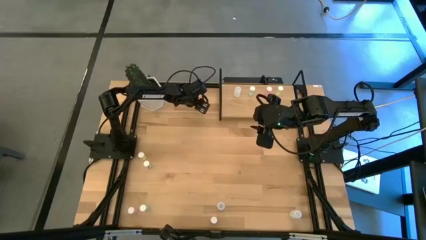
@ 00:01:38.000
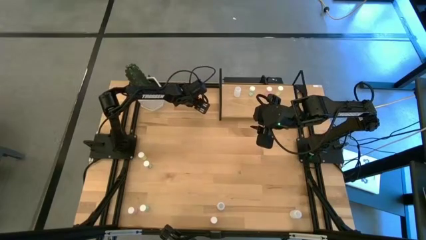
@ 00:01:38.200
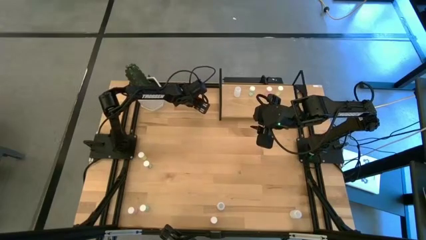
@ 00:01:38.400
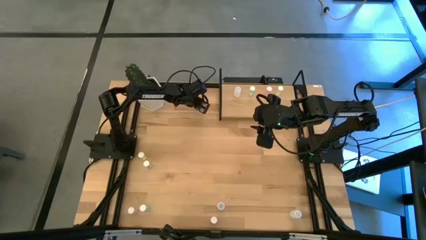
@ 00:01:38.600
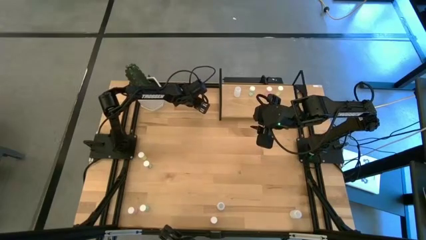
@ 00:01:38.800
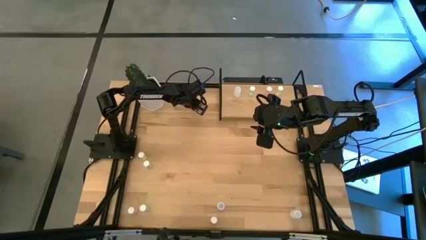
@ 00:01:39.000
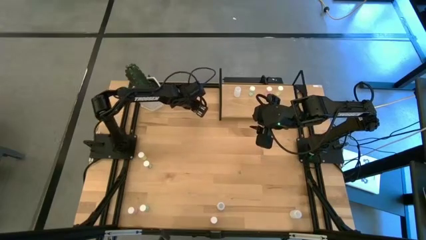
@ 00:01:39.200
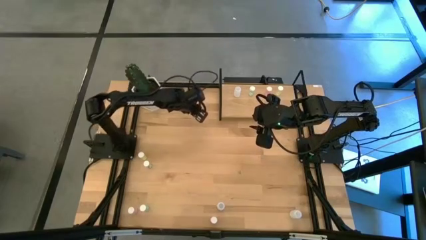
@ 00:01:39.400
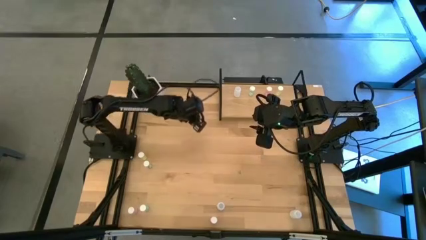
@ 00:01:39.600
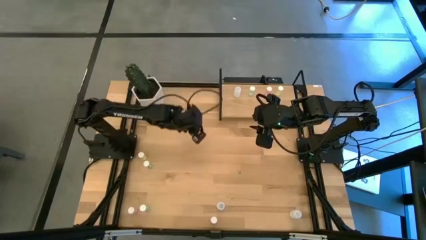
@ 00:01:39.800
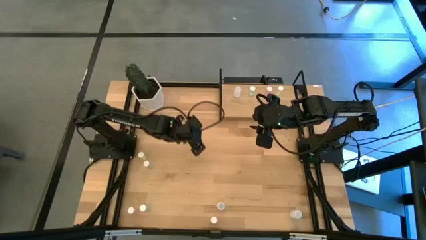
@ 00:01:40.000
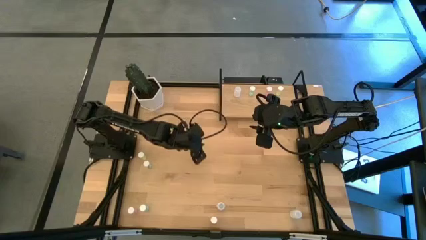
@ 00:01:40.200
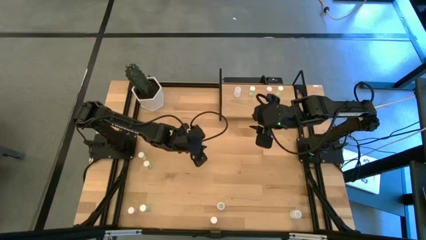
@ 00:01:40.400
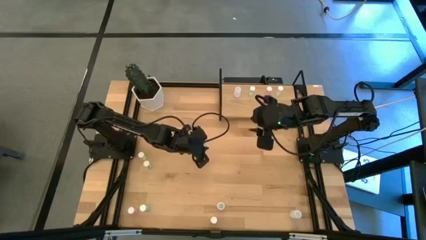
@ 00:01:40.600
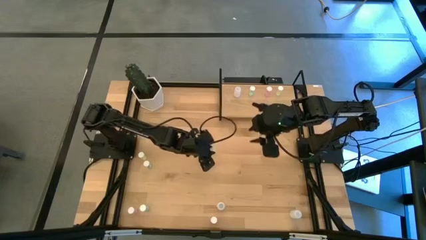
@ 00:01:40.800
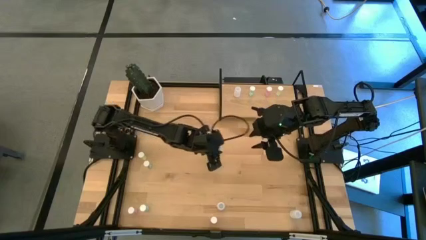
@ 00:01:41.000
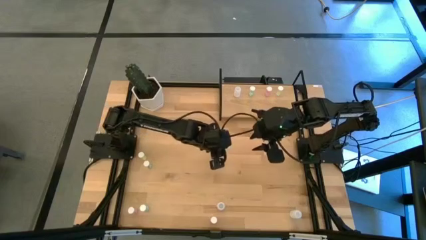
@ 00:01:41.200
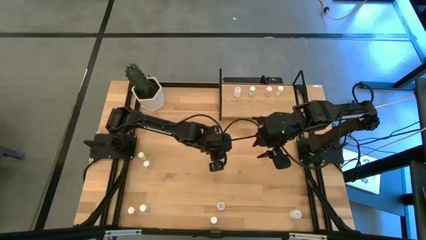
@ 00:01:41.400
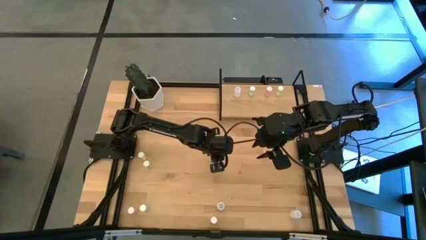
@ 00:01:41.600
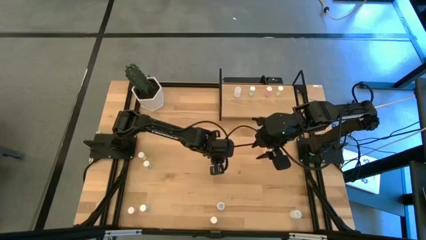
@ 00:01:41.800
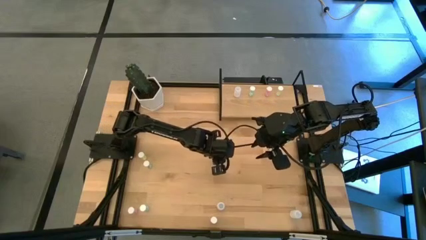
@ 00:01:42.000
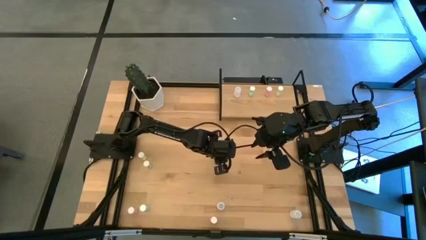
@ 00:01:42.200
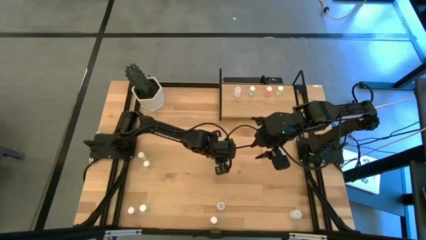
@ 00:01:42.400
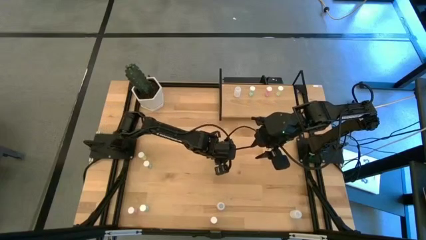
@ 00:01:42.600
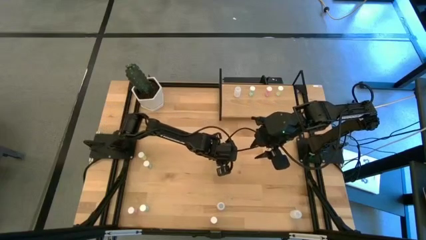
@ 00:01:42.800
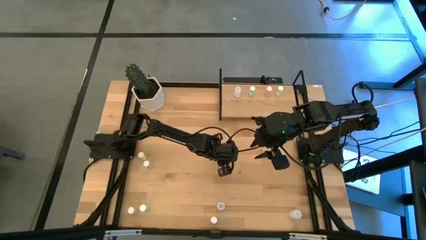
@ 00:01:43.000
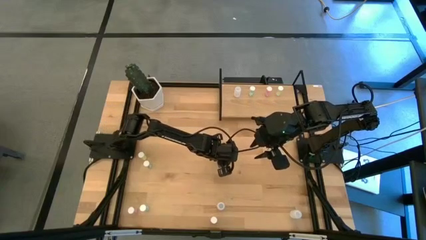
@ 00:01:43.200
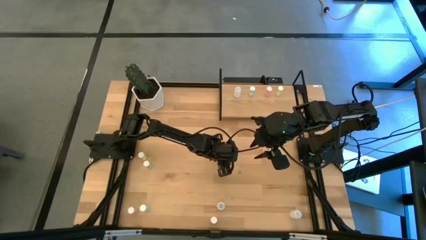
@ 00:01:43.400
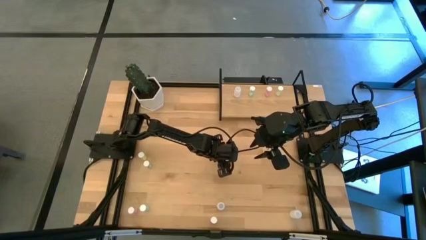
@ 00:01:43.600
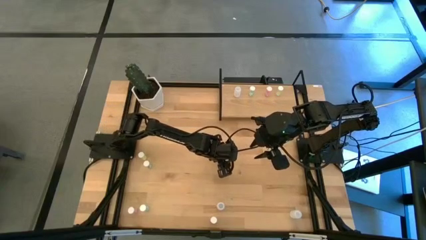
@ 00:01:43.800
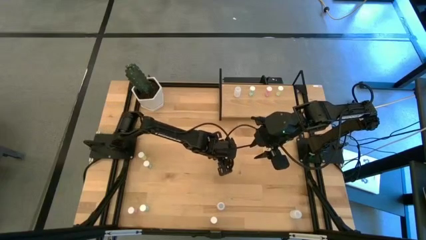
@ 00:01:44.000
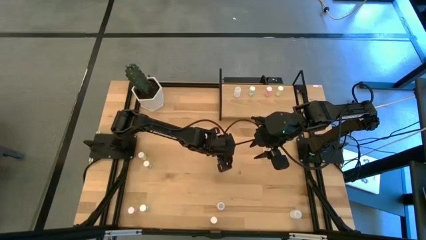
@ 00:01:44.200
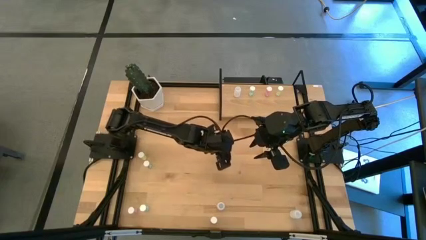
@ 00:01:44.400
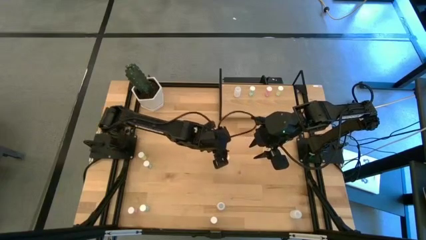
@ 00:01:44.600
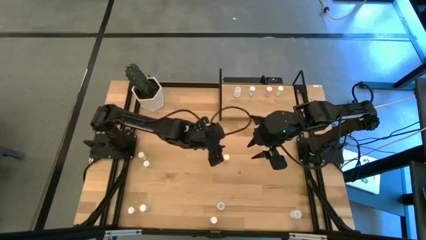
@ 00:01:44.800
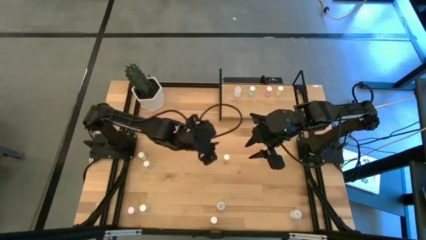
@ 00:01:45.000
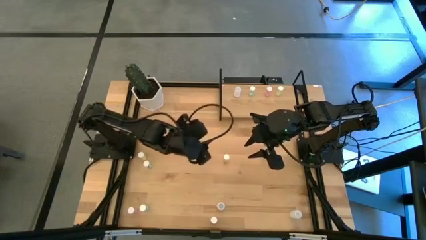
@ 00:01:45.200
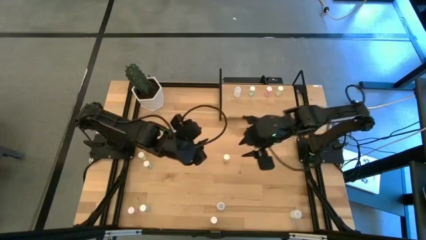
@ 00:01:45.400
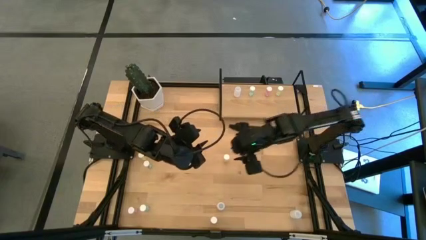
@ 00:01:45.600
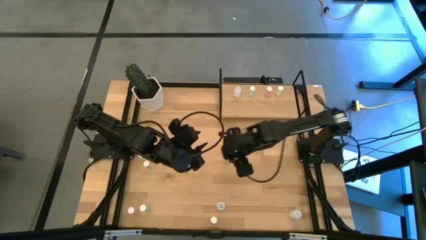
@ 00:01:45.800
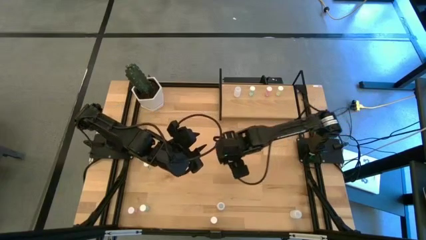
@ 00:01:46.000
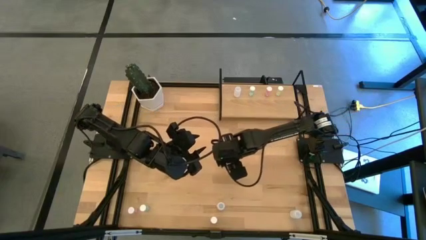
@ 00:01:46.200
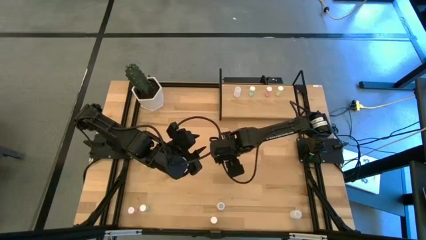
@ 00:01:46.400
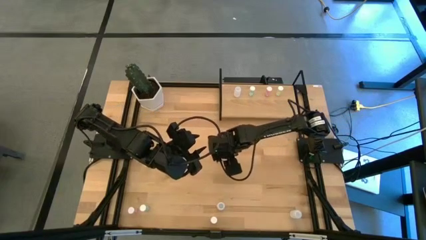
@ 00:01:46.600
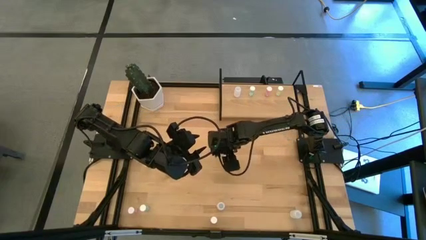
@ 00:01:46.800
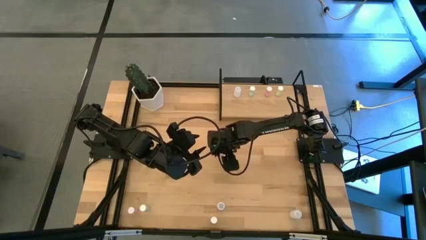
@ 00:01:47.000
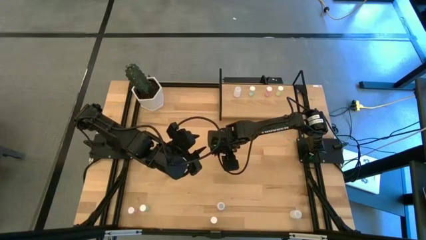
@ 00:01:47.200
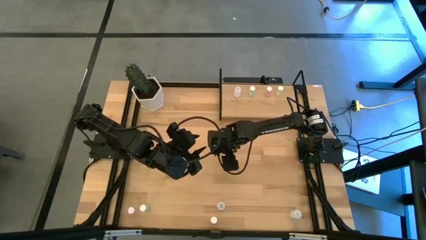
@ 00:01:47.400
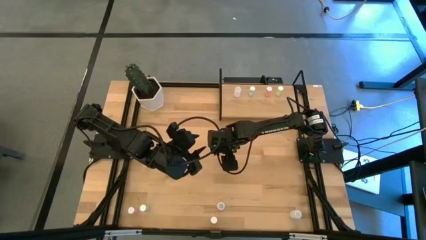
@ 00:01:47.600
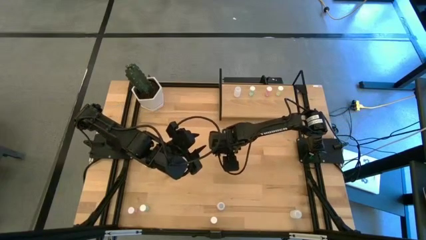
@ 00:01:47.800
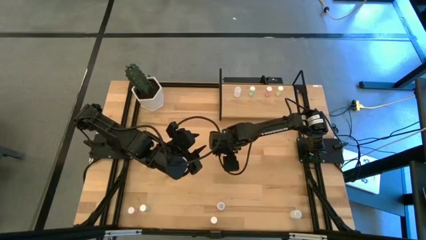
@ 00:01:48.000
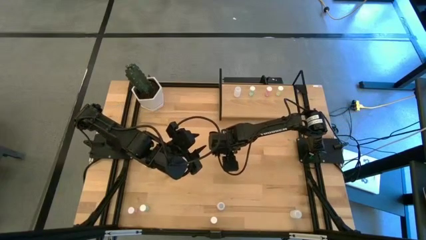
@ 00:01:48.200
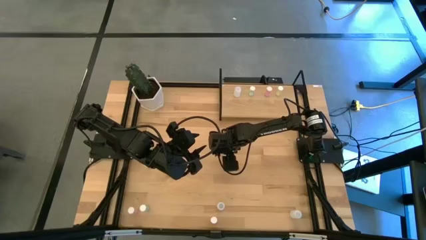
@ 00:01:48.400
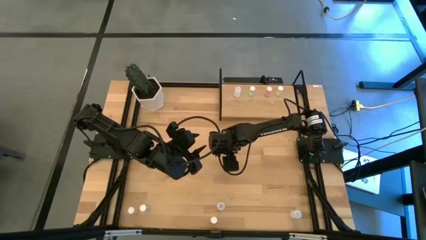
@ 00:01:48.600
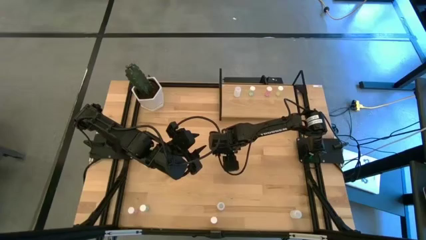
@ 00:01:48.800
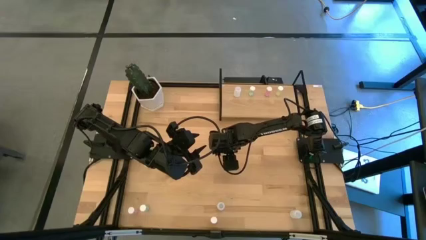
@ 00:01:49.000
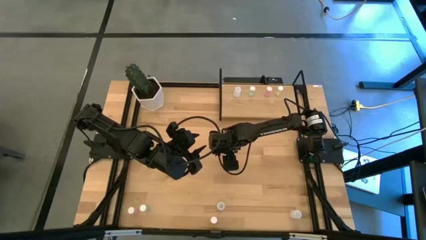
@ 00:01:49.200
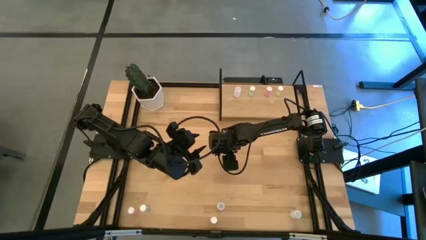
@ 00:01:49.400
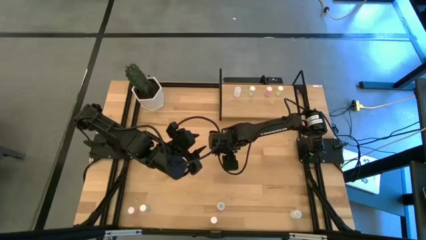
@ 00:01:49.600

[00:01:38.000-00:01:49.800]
Task: Pick and place medicine bottles onto shelf by color
Put the top yellow pill bottle on the shelf aligned with the other yellow pill bottle

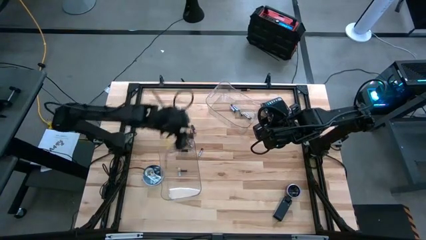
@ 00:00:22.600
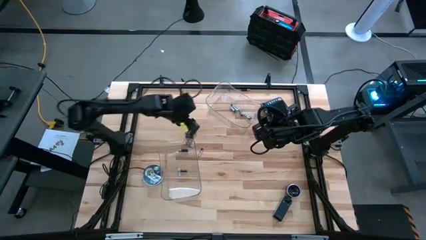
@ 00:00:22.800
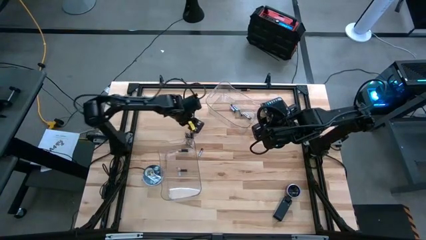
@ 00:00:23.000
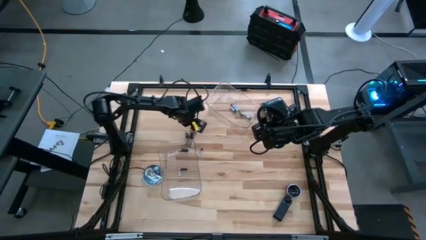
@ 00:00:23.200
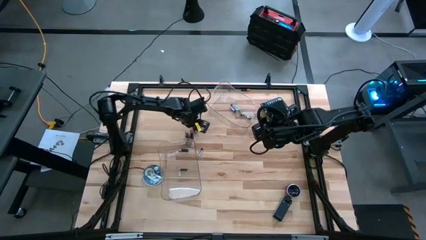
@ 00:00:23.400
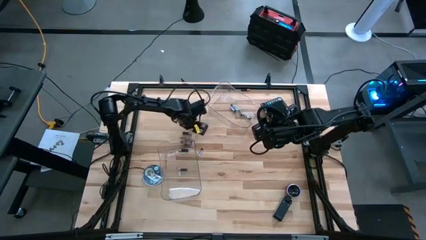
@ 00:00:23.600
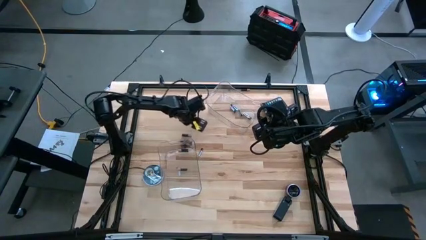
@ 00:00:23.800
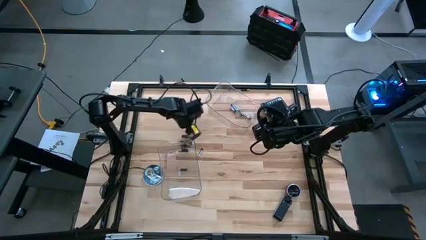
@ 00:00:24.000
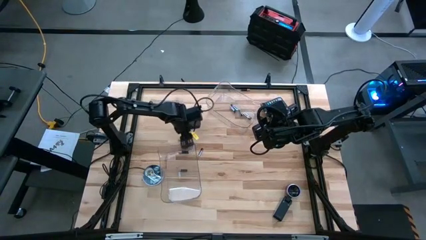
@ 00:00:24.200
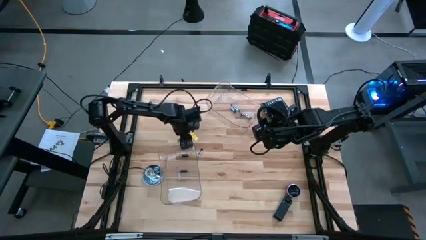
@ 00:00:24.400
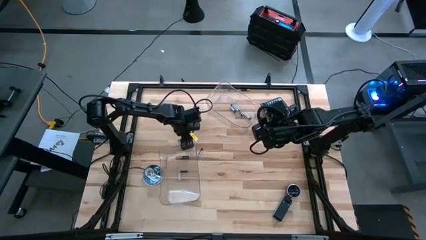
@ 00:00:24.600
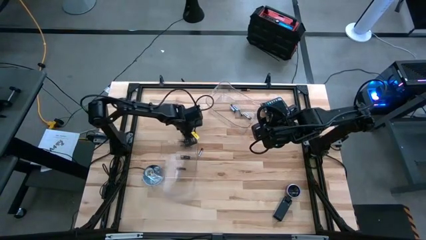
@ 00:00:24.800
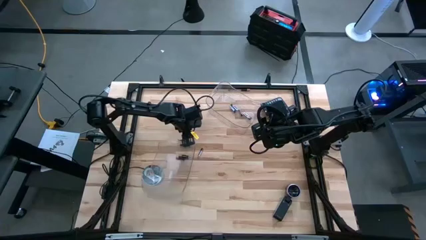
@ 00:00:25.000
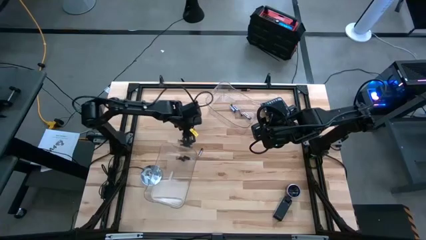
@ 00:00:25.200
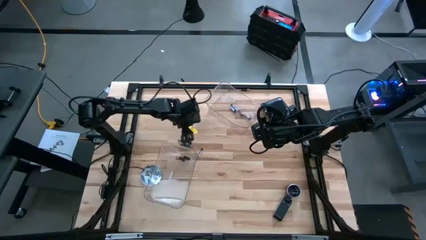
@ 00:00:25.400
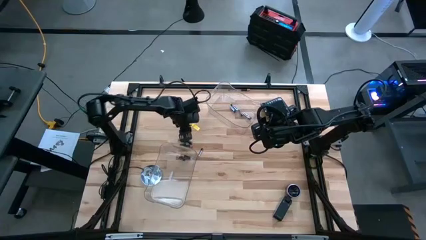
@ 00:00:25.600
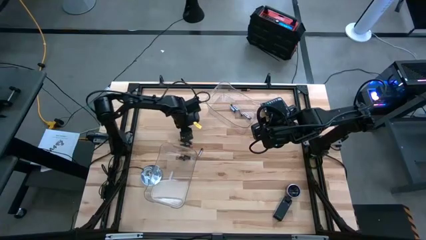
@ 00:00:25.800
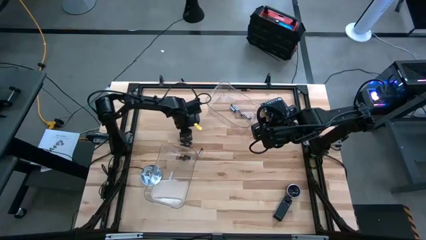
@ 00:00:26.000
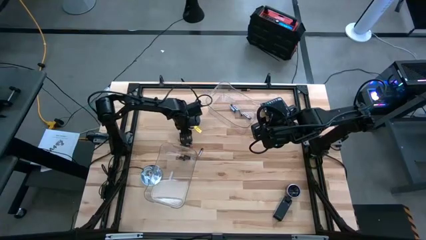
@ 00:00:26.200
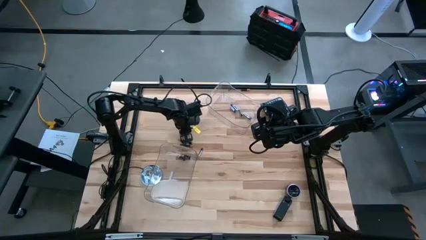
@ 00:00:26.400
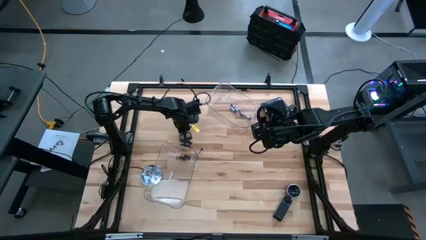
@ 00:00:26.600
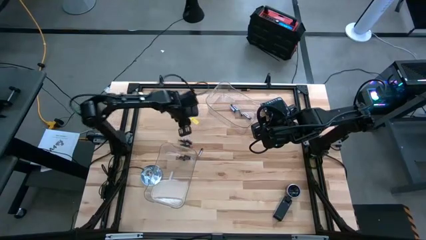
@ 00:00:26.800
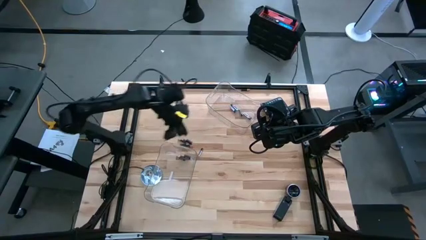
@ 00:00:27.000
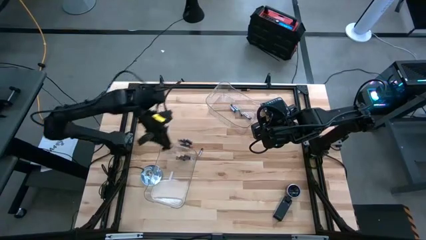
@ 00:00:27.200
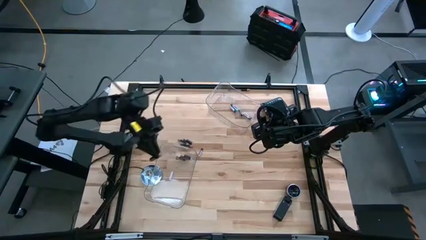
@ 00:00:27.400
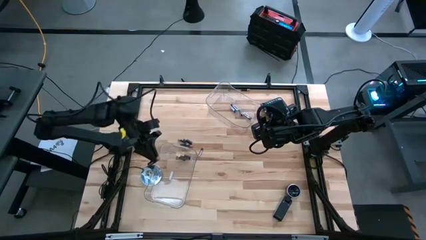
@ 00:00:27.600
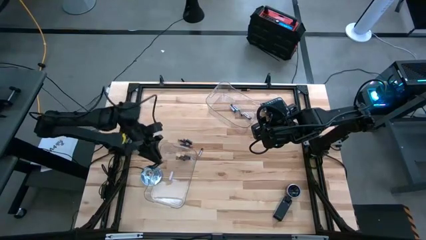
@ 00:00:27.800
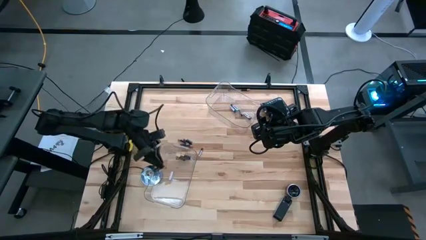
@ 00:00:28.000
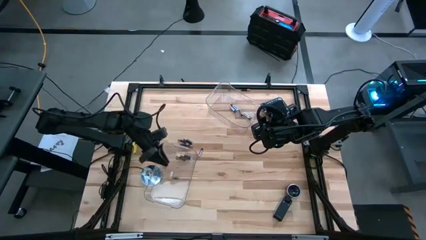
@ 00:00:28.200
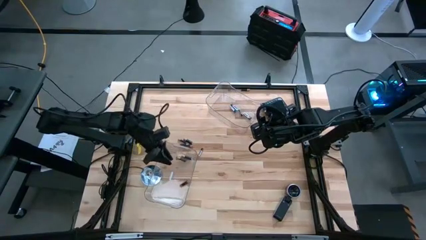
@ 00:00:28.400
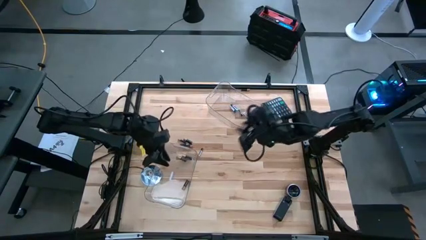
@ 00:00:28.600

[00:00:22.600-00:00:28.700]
Task: Sort batteries
Put the black battery into the bottom transparent bin
